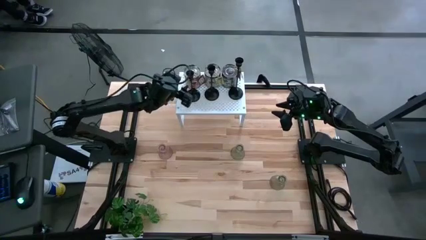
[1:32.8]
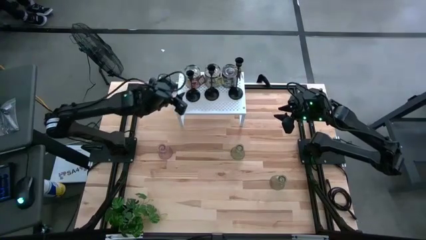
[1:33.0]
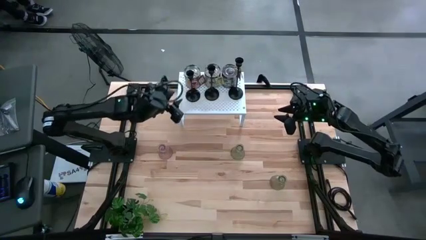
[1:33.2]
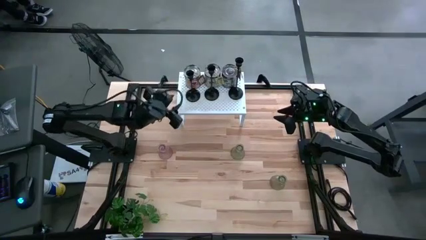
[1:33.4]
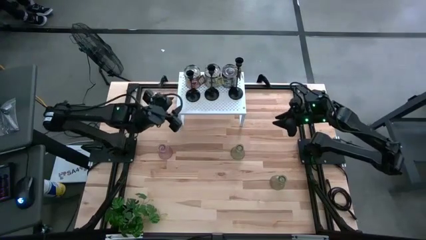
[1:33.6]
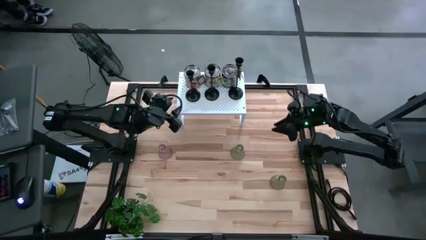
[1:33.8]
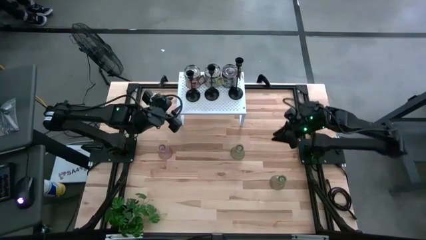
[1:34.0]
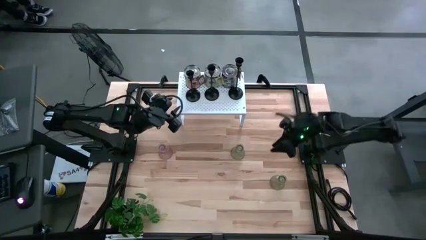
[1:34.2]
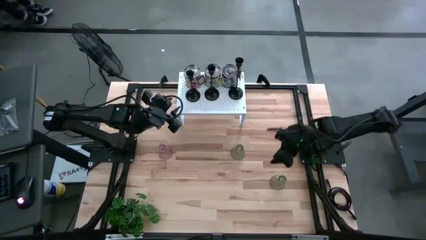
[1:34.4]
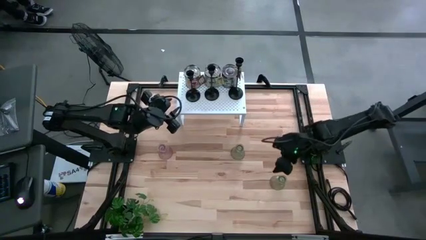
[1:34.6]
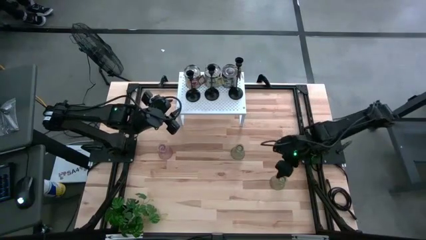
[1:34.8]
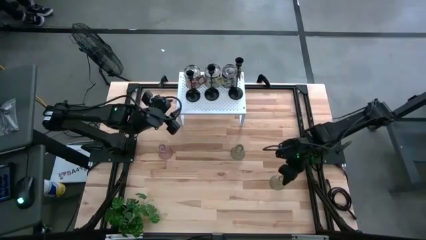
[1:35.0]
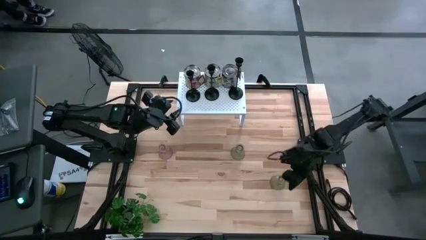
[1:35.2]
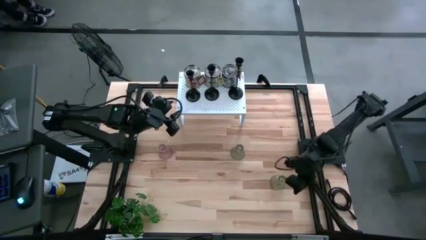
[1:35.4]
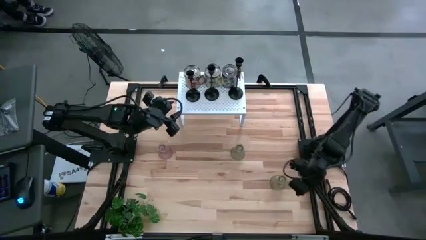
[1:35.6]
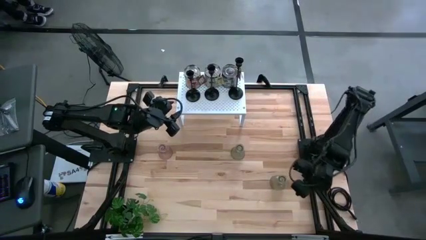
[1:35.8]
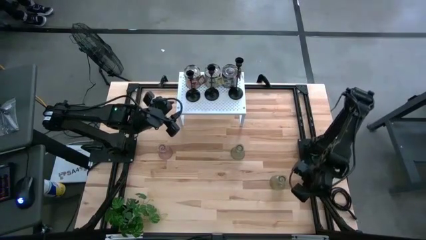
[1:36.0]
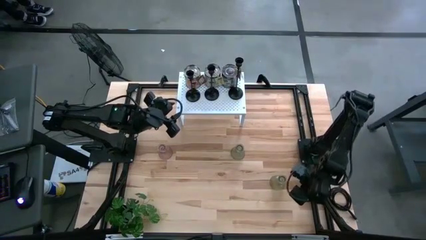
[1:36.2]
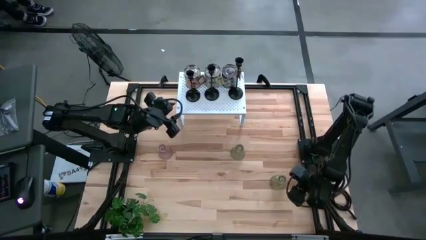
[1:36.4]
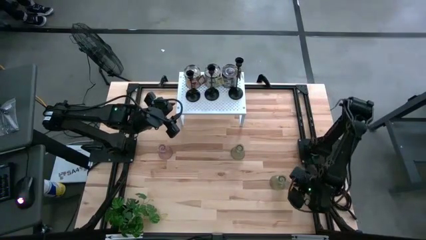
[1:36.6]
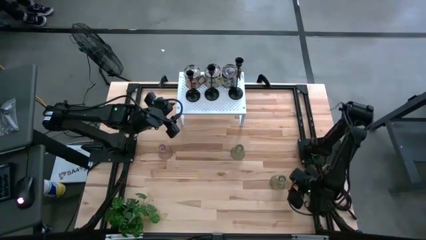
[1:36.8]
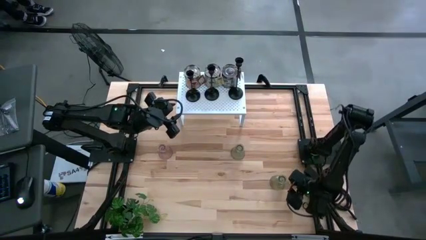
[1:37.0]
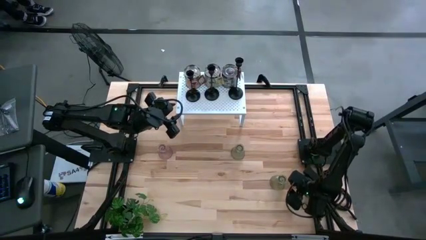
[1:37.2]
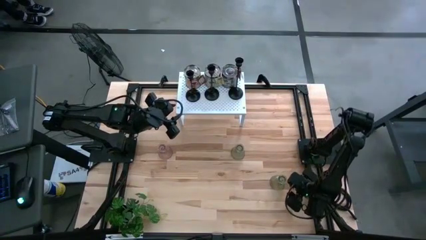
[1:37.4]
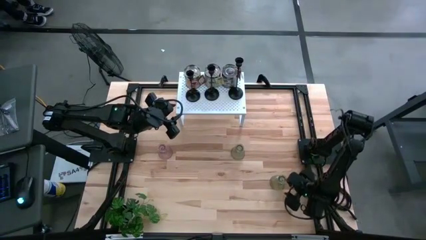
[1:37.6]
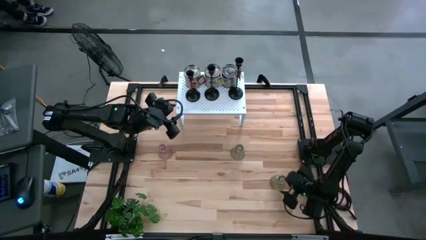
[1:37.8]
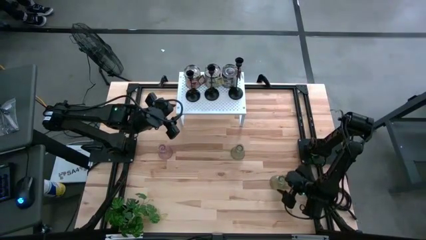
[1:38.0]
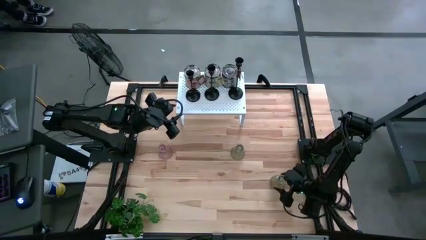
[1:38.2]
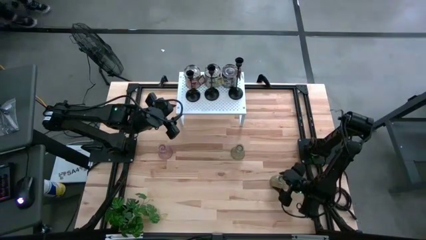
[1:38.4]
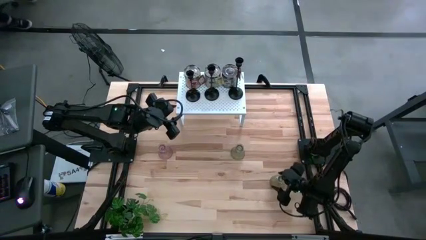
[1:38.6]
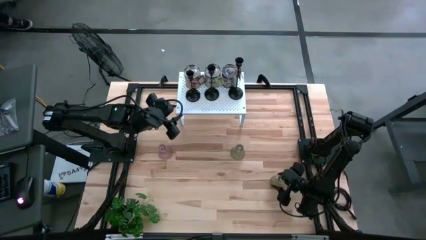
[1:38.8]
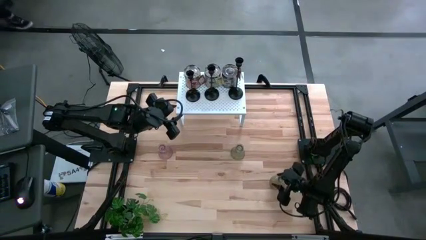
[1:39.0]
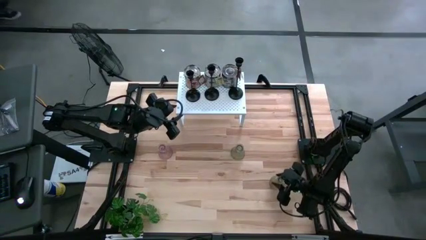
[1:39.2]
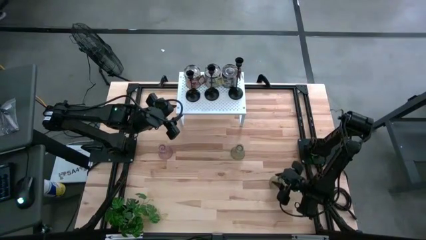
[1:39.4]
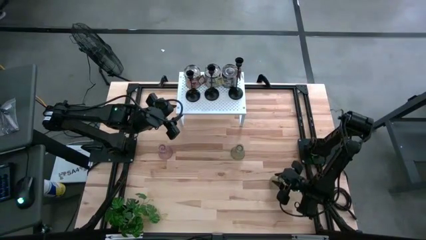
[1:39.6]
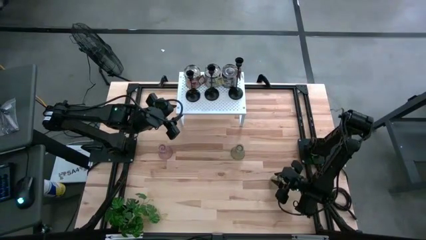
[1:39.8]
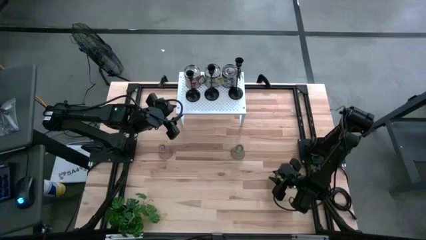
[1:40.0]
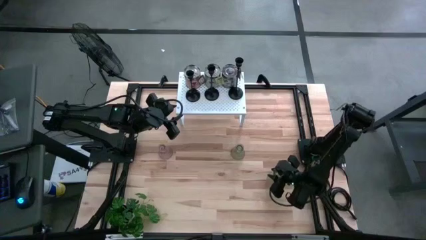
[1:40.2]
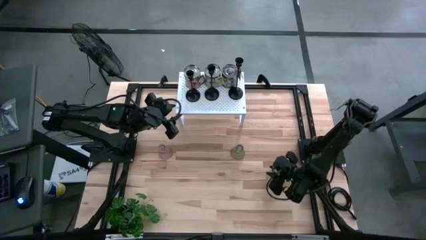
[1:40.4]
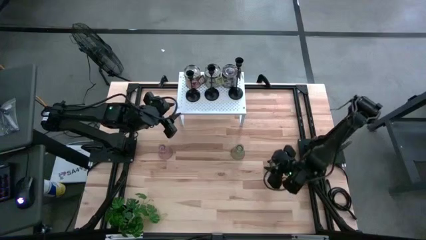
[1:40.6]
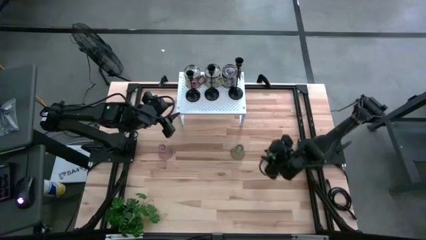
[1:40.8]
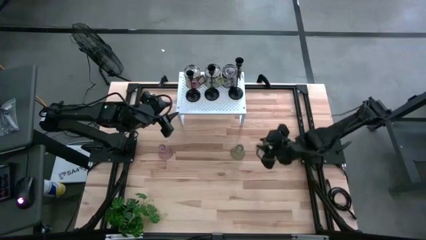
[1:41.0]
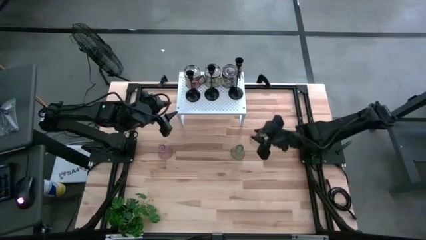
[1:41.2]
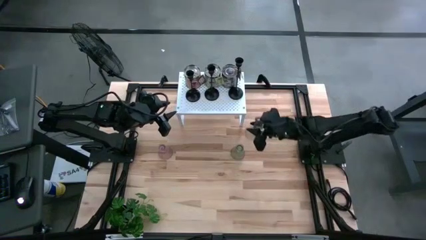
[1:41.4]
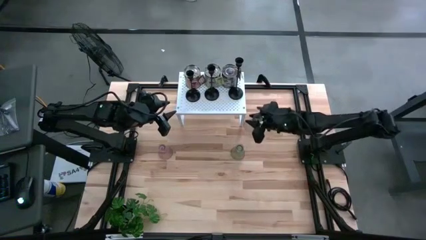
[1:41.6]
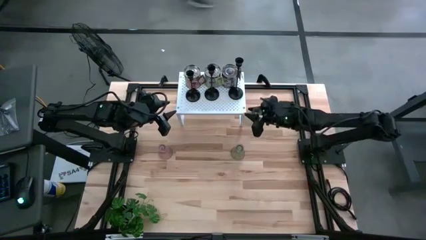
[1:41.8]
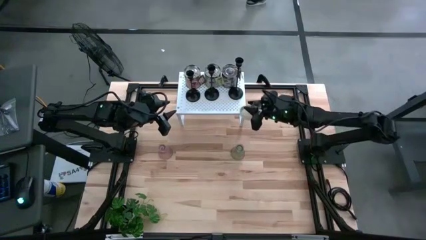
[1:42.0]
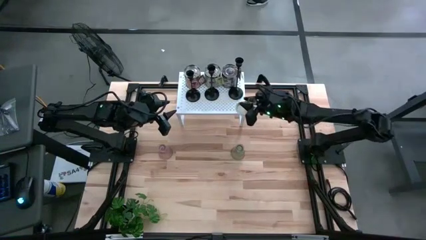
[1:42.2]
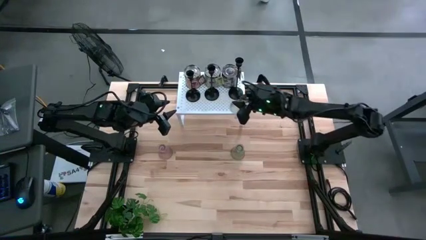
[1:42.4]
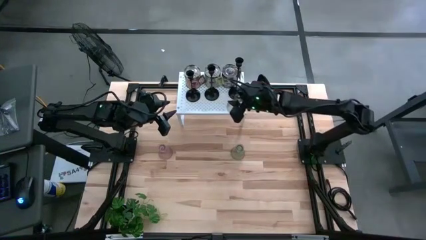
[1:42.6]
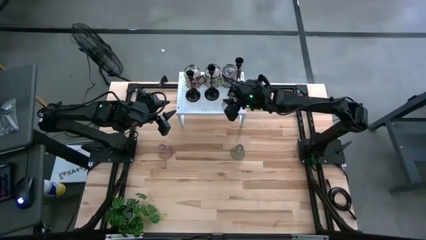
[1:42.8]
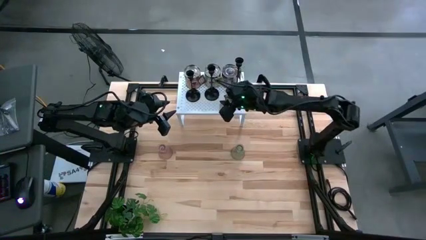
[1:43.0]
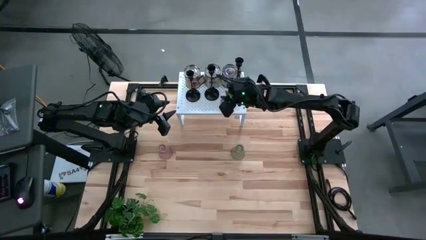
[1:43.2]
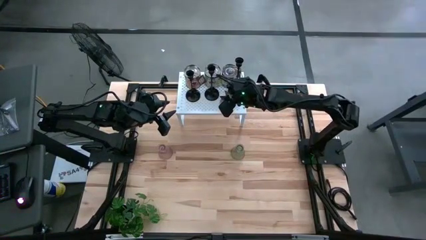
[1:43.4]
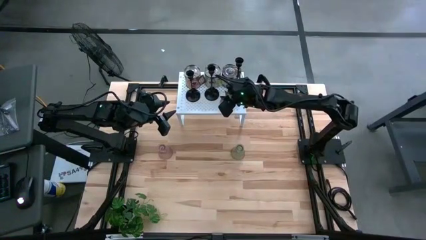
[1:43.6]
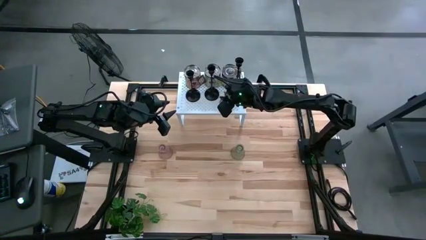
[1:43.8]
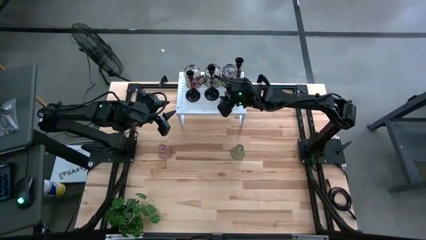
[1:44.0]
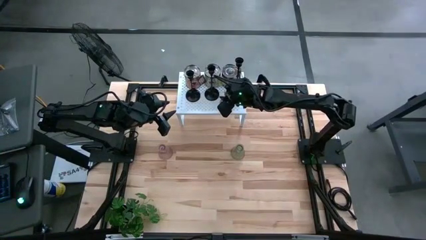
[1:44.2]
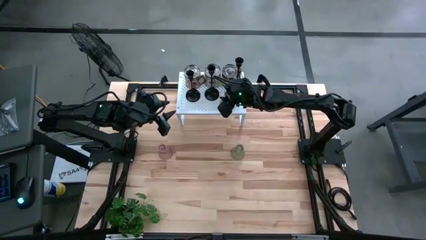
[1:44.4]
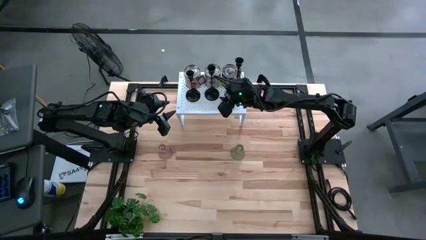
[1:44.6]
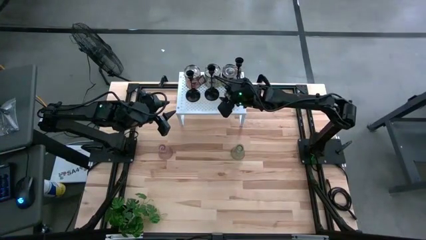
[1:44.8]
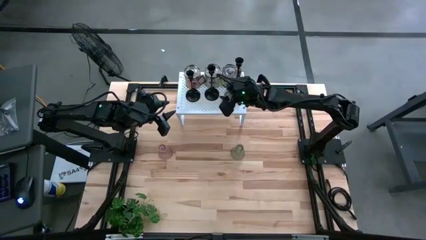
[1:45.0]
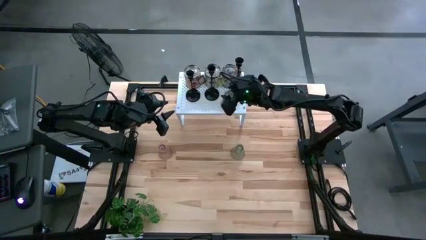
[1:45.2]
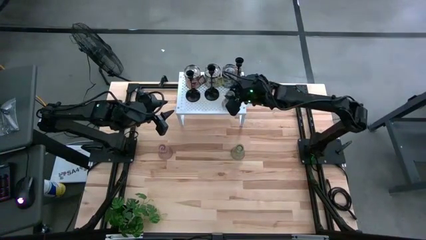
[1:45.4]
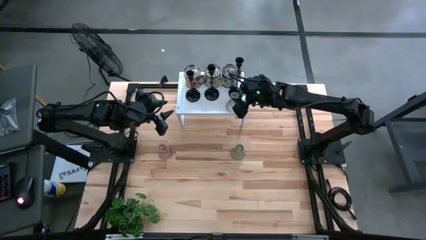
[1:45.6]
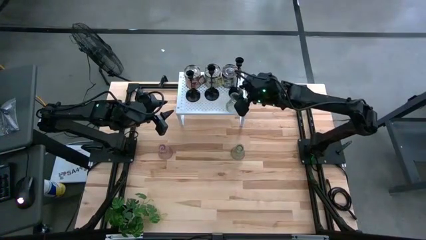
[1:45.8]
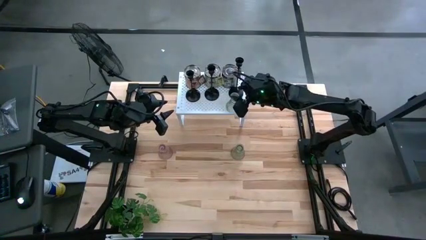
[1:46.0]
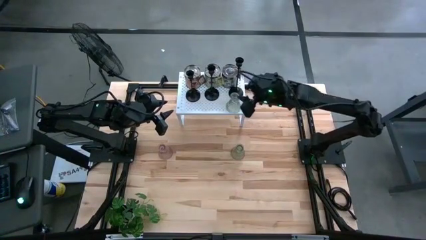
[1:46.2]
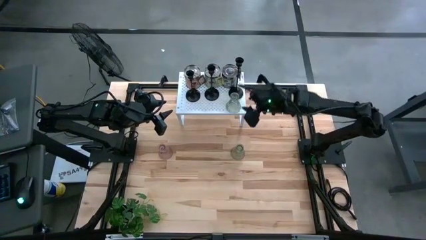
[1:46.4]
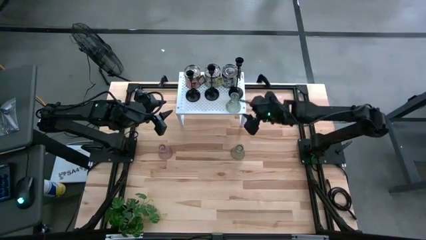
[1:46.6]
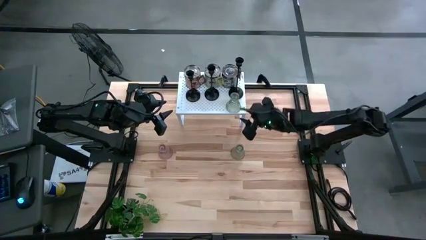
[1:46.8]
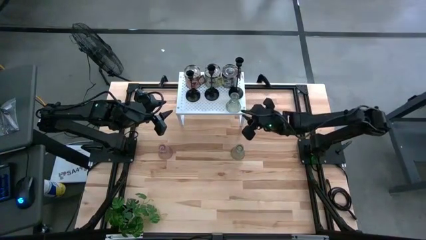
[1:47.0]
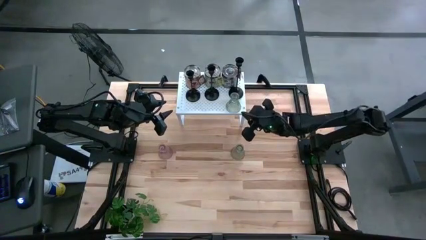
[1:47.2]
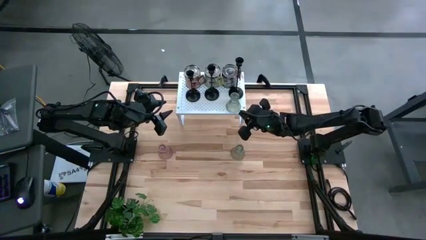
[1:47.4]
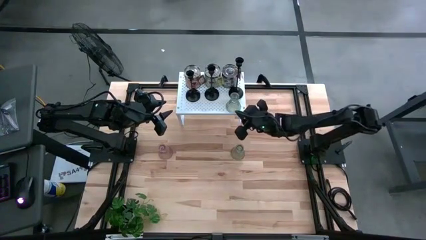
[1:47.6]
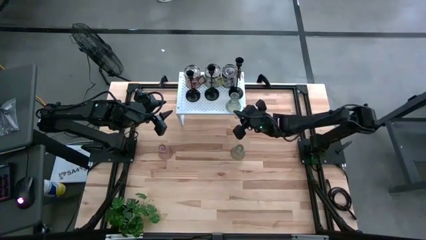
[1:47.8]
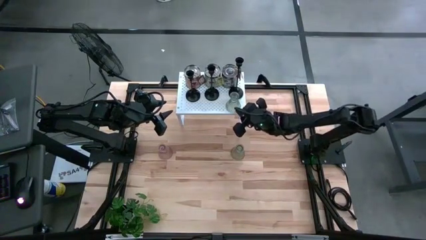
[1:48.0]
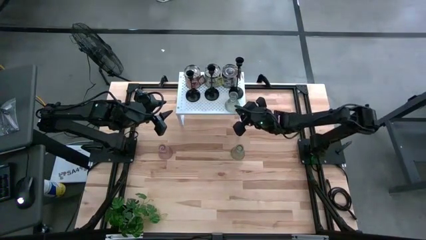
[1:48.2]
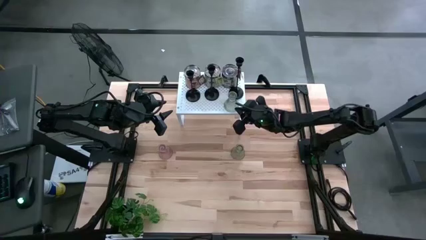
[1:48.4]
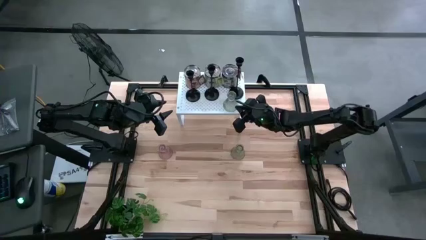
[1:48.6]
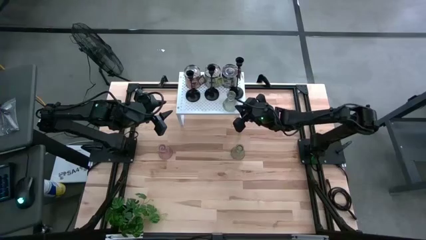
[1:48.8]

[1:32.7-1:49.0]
Task: Pick & Place candle stick holders
Put the right transparent candle holder on the shelf

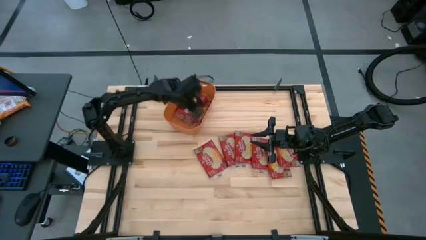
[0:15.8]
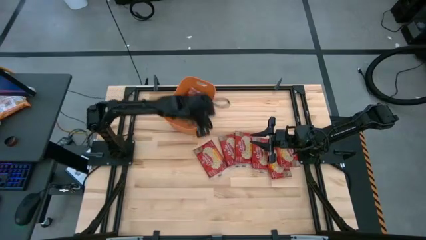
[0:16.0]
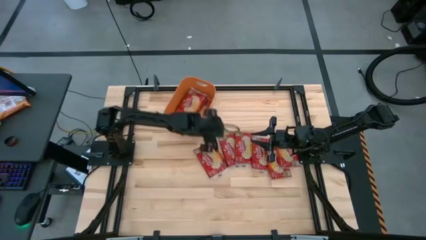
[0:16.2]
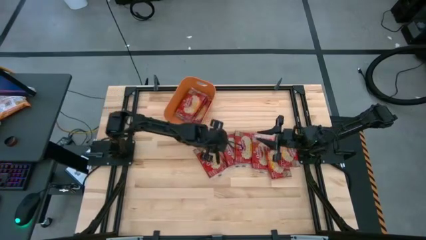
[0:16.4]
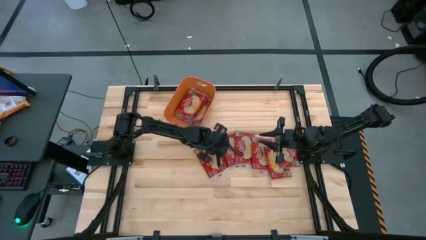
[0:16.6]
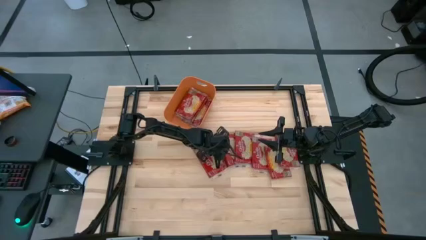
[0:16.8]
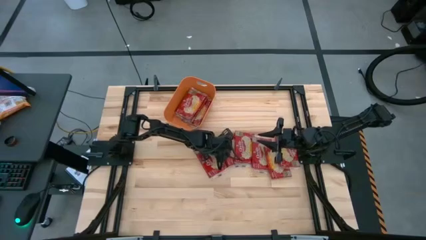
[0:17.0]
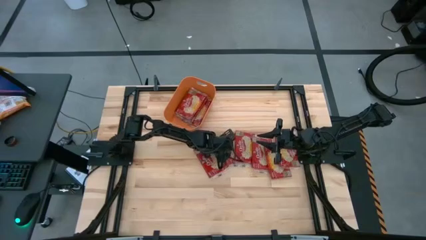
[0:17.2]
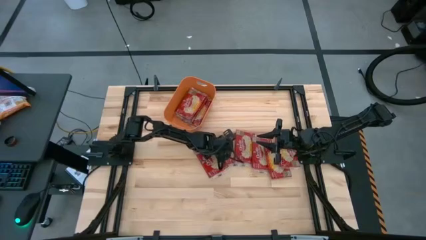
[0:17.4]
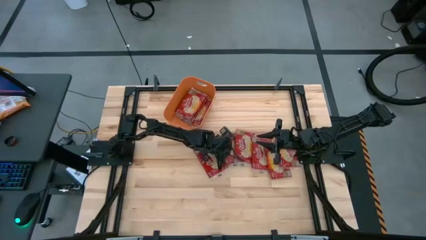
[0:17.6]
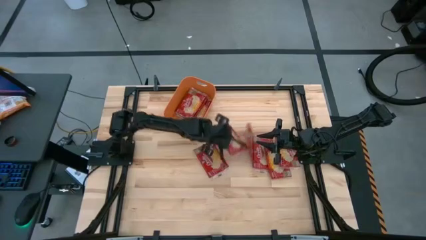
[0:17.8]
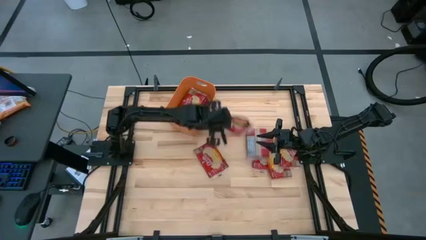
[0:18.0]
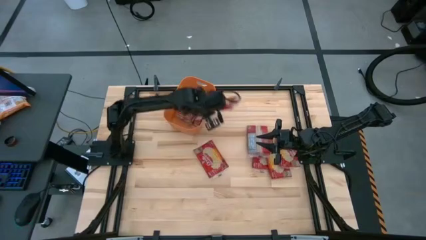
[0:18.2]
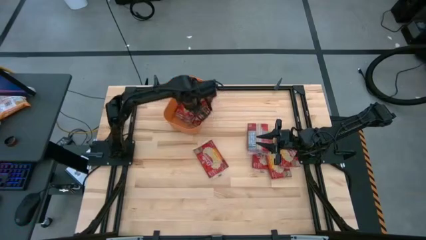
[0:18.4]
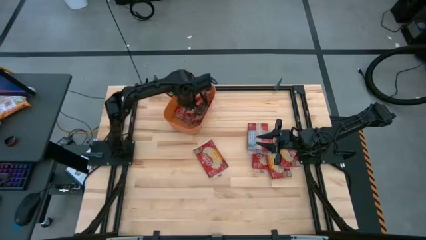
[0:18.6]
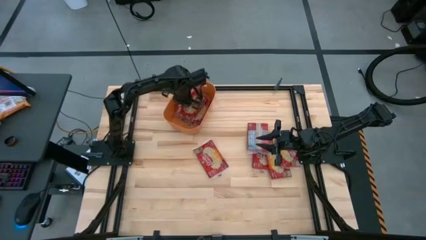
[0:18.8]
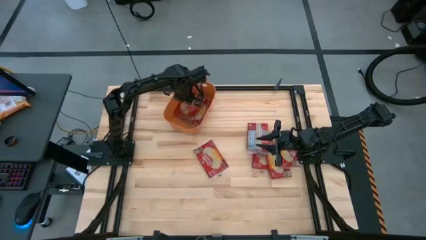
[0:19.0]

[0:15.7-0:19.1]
Task: Sort popcorn bags into baskets
Put the red popcorn bag into the orange bin
